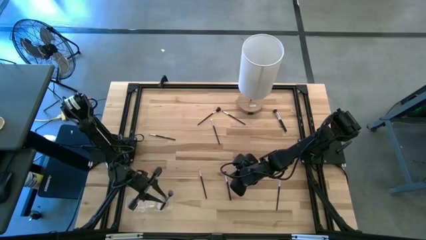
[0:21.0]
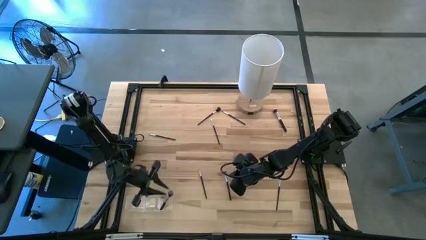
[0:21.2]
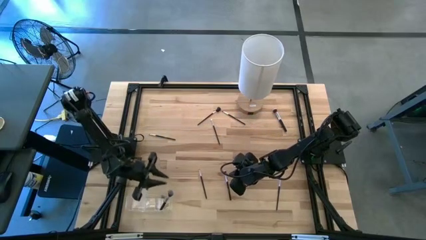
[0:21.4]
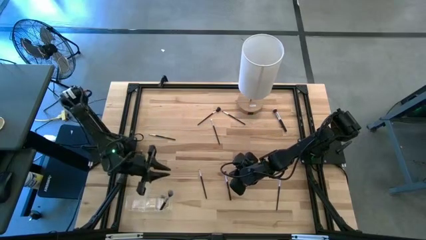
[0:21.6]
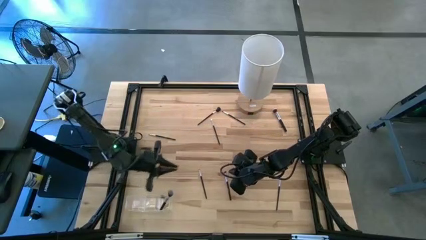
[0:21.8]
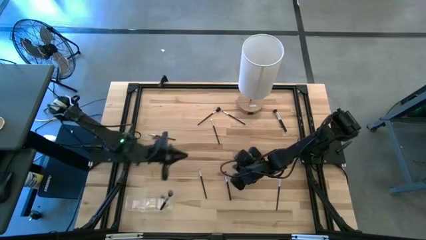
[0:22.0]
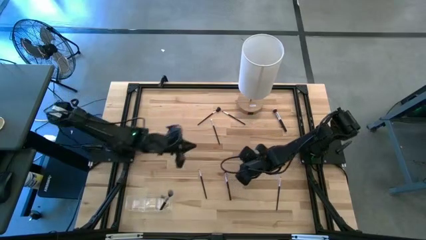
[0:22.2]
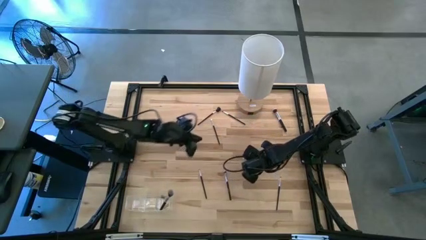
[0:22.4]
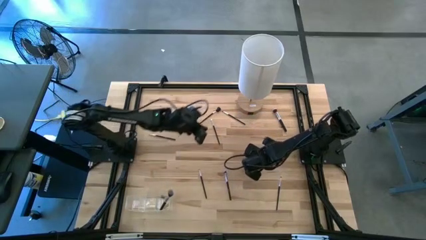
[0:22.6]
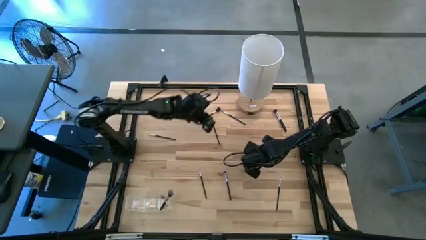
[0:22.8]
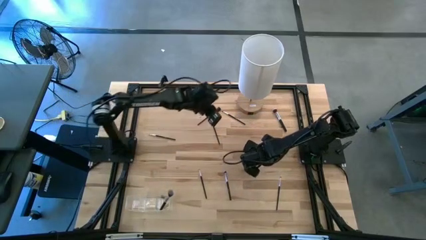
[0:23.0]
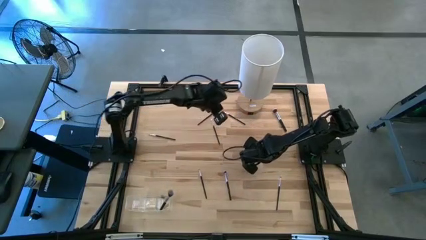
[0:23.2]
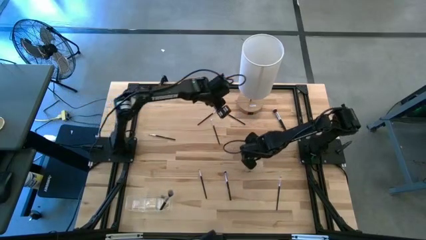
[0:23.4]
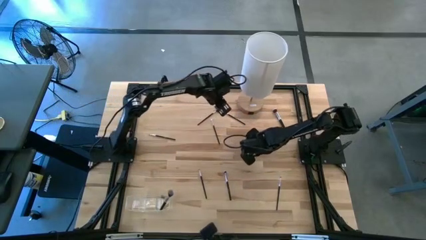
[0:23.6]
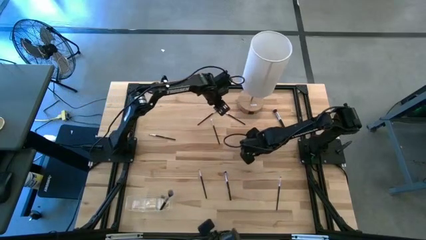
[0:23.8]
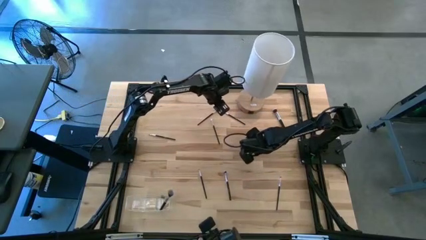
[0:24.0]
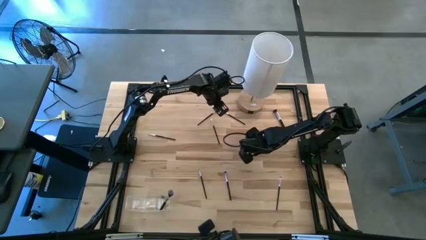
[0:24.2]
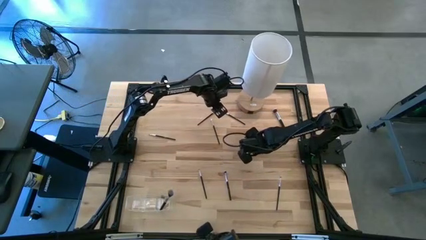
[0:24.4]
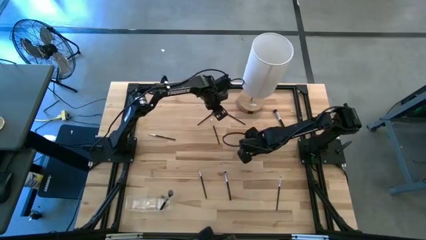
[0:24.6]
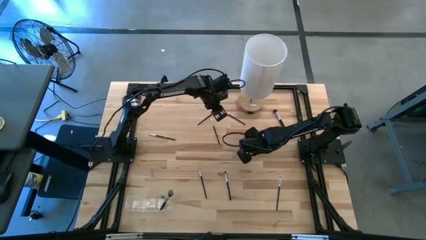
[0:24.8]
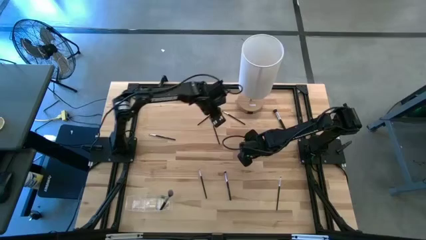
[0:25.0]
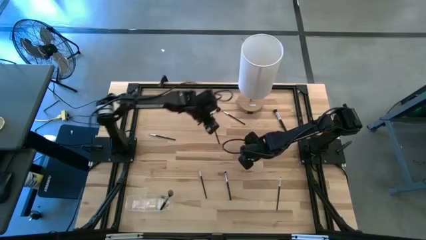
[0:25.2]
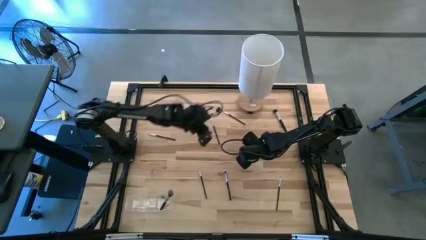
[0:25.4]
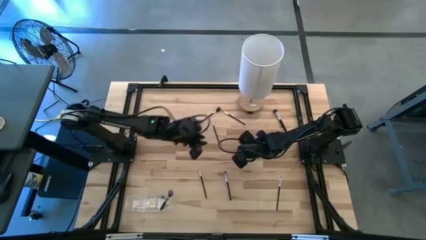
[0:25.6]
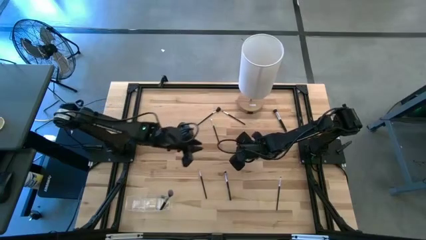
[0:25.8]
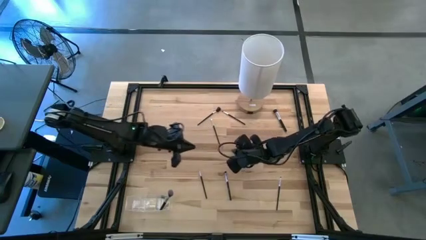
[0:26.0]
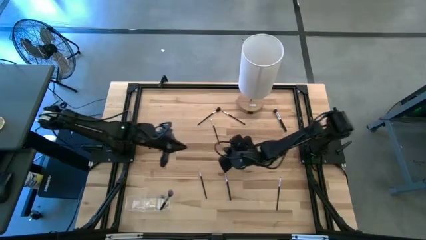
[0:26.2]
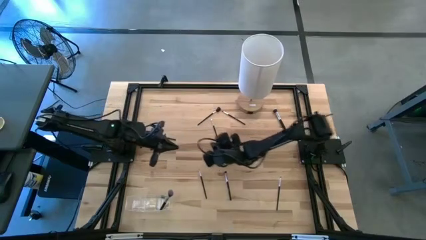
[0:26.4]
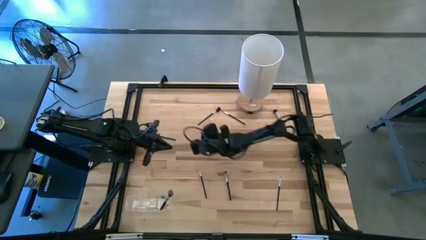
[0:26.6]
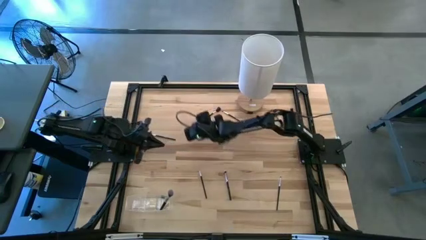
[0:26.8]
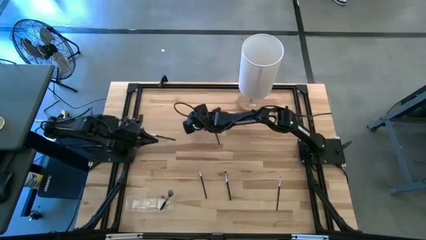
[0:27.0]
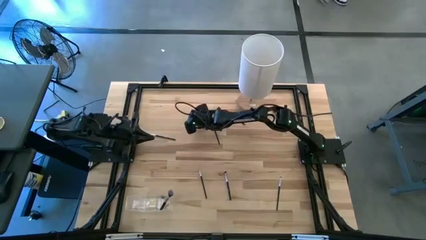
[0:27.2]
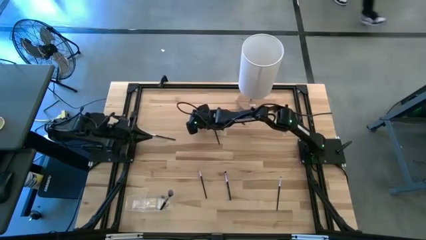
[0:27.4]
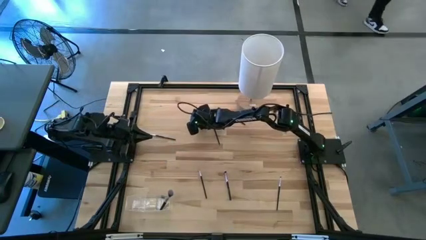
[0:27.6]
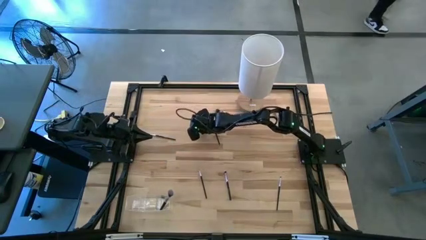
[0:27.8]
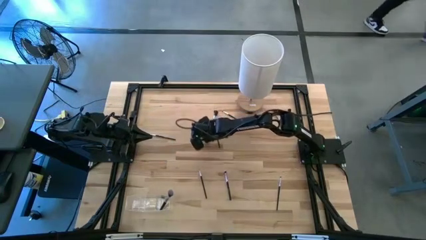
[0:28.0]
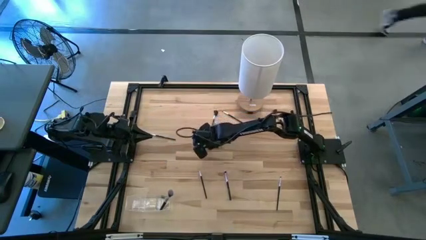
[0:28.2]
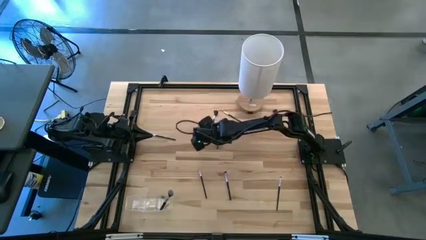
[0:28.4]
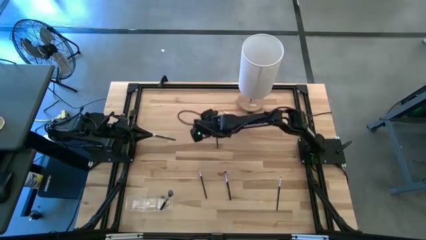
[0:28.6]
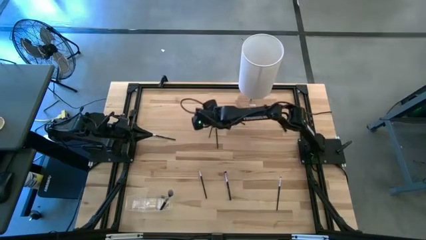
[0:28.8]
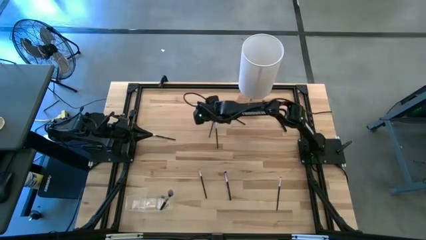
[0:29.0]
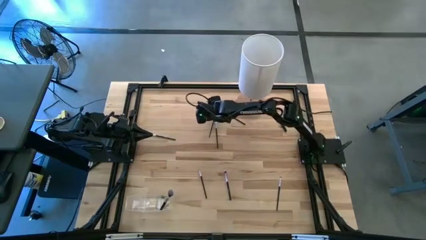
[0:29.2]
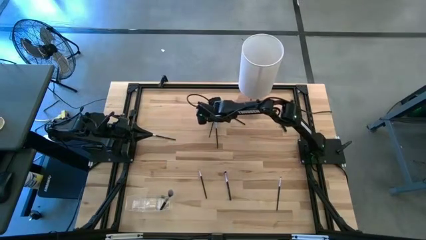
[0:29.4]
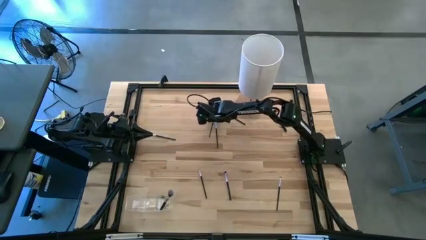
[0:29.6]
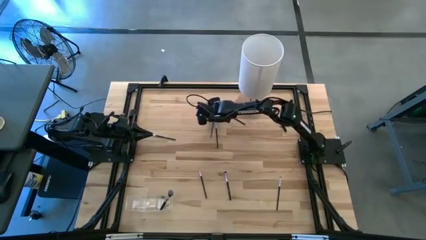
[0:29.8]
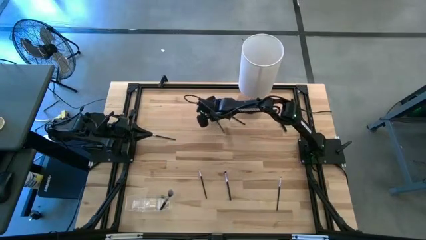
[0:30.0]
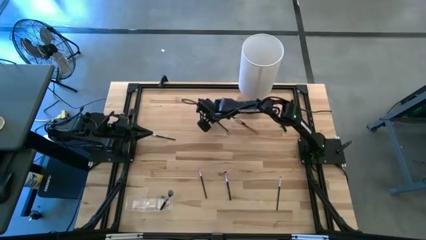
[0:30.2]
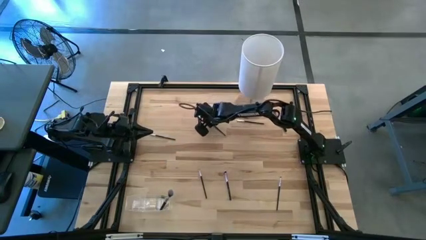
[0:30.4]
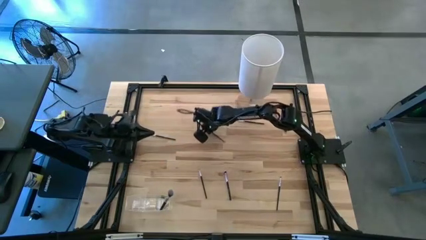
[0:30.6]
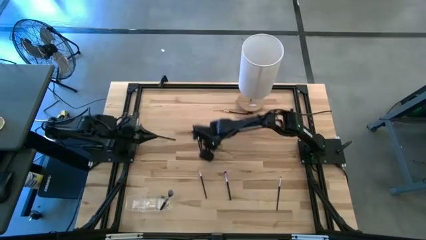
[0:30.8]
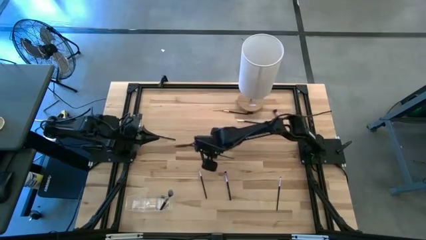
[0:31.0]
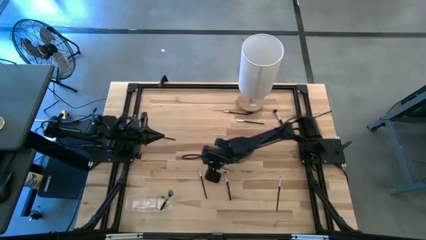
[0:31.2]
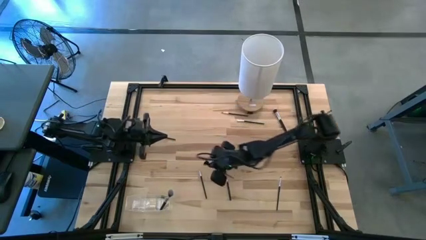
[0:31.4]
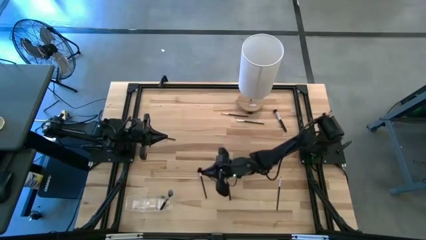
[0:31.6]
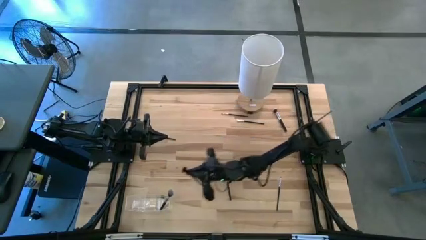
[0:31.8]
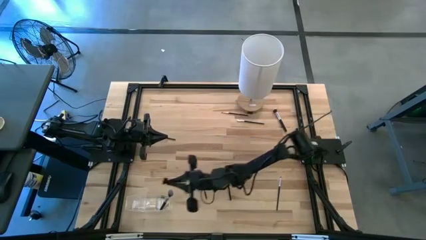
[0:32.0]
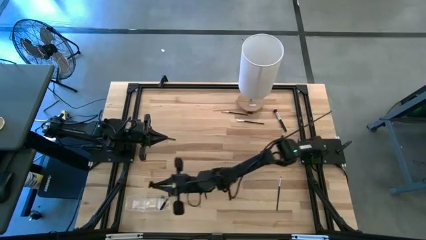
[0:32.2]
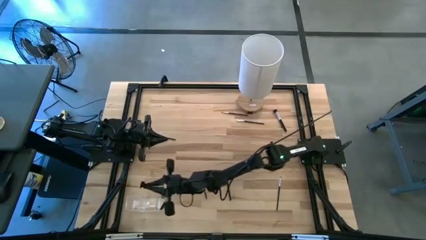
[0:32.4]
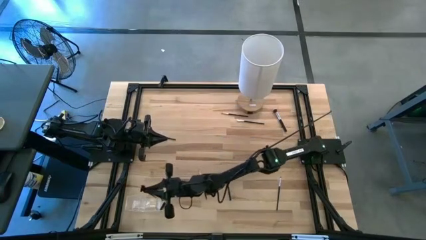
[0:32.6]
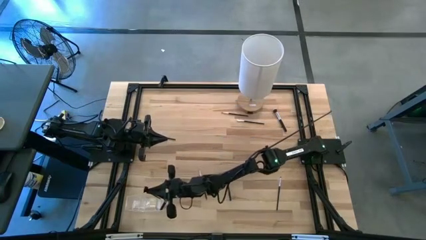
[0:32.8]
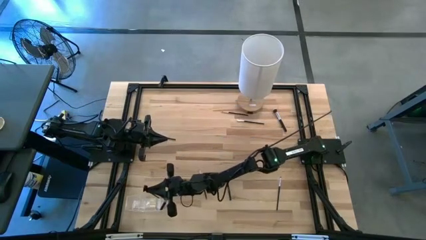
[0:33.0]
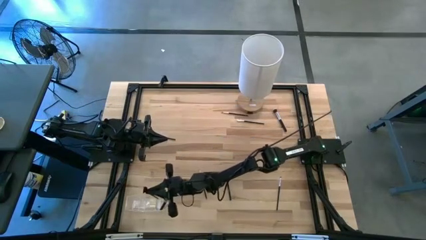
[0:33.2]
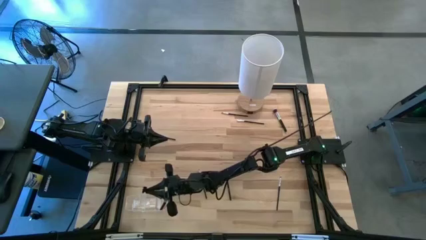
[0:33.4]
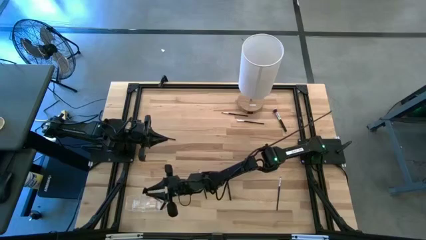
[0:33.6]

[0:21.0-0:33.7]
Task: Put items in baskets/containers
Put the black eye grooming brush into the transparent organizer

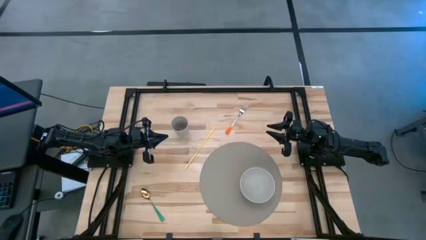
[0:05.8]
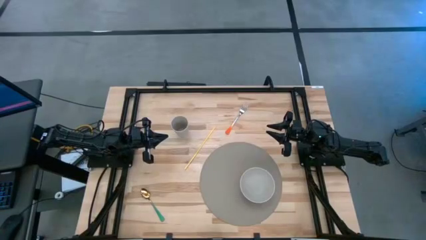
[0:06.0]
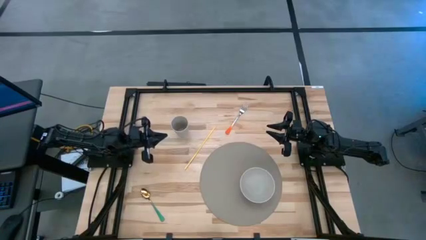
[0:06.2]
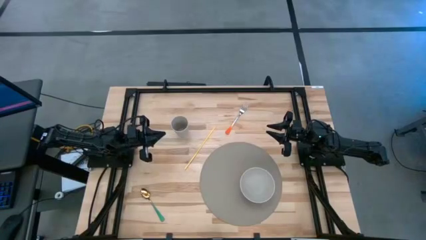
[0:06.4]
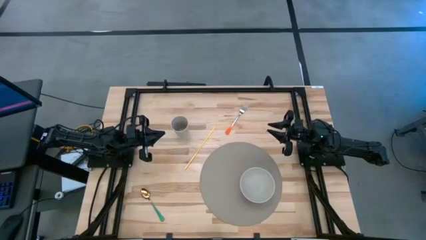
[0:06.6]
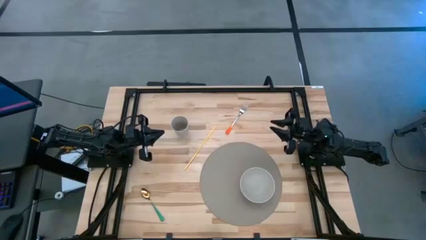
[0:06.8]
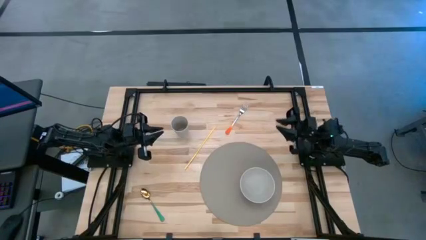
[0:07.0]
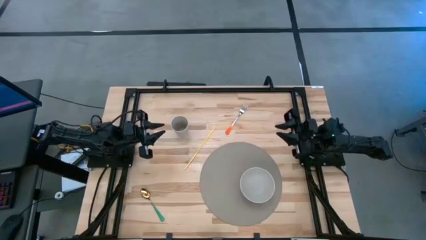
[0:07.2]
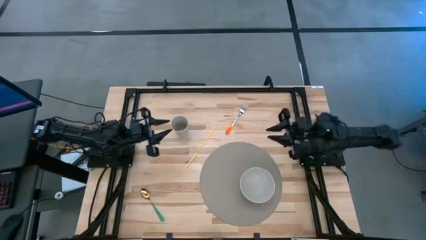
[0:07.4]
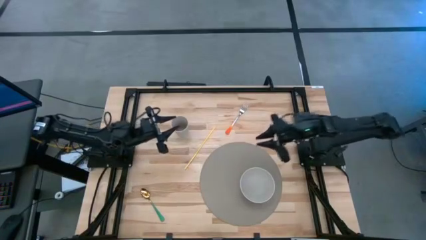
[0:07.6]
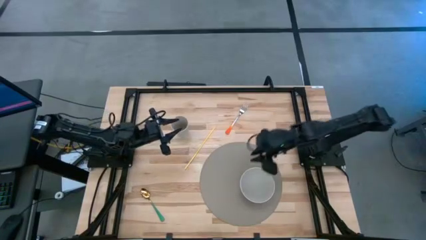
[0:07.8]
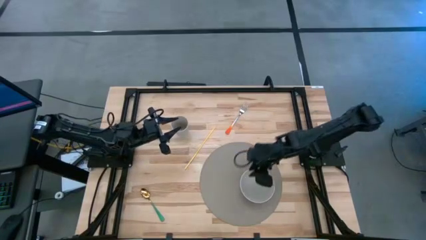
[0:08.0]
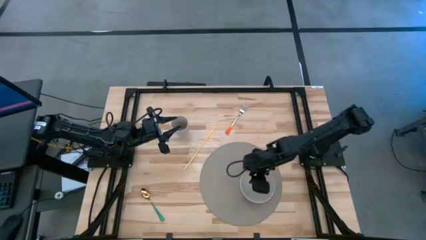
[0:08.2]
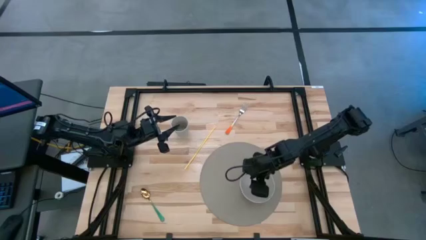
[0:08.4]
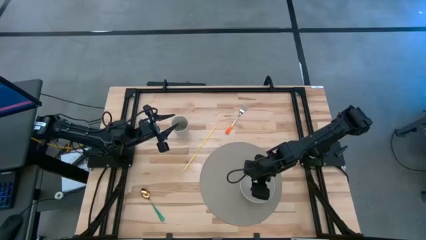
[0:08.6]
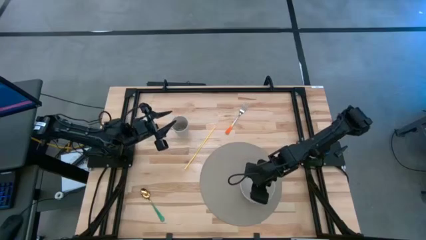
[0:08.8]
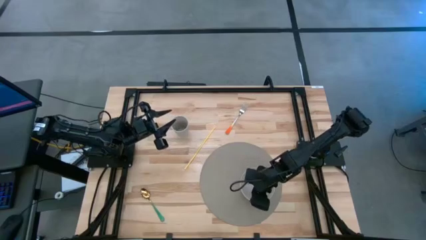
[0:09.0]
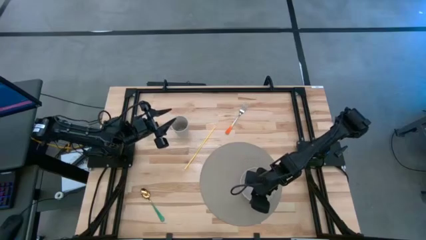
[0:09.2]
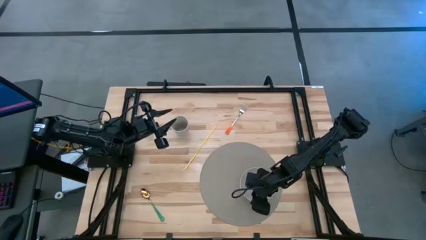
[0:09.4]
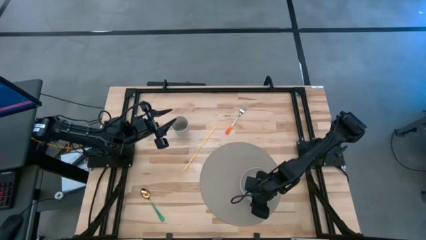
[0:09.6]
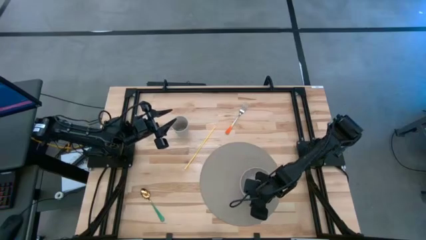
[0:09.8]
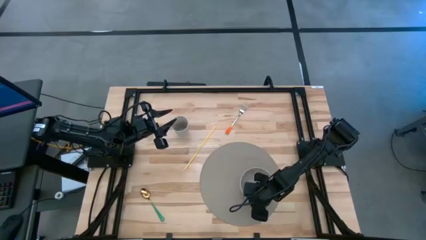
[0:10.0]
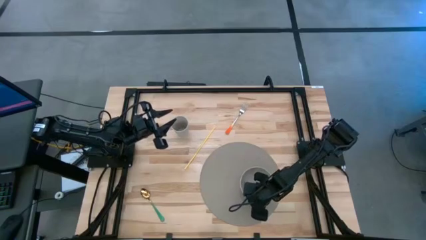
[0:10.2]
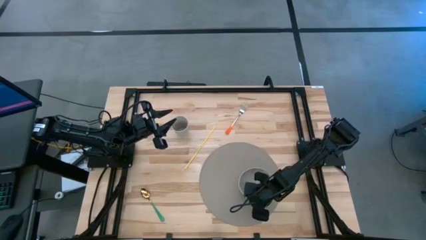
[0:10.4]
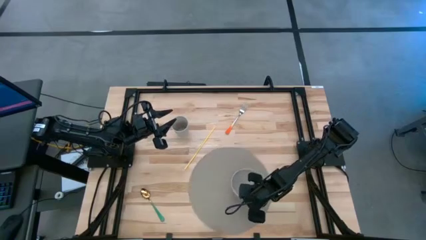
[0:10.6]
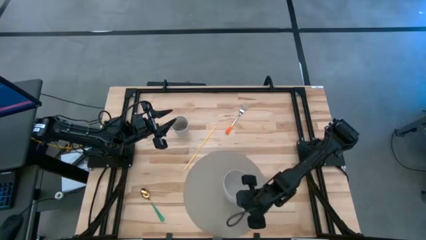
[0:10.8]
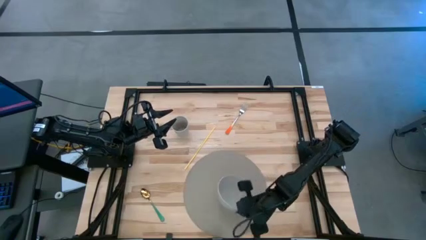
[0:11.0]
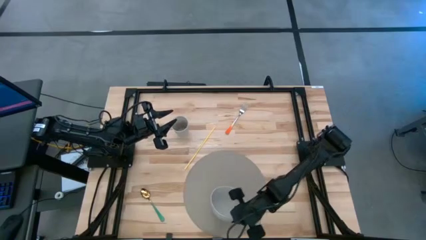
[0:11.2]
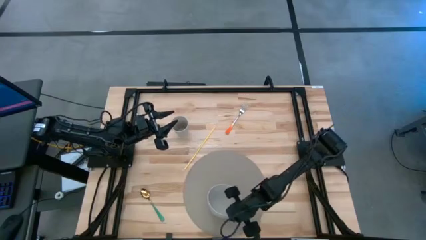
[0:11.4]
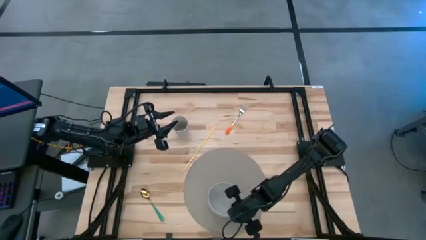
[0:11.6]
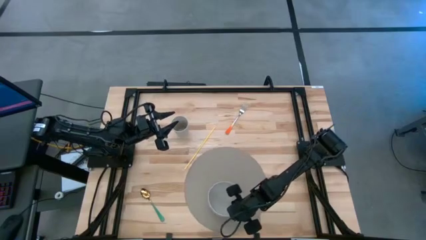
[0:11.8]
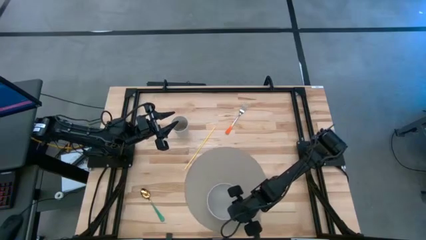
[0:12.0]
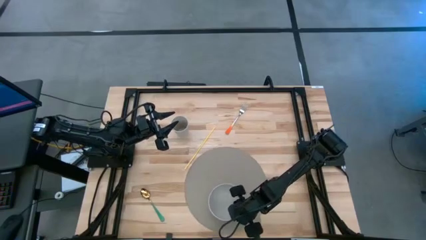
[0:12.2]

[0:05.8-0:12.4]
Task: Pick & Place Utensil
Adjust the white bowl on the placemat
